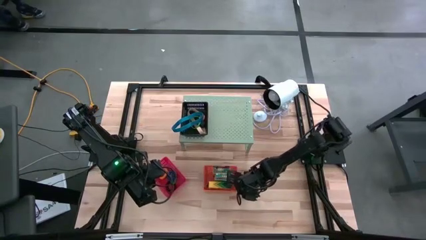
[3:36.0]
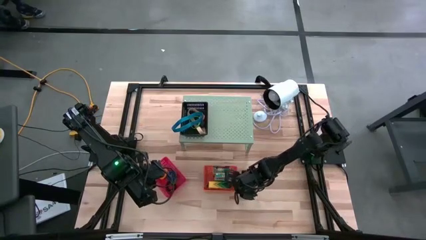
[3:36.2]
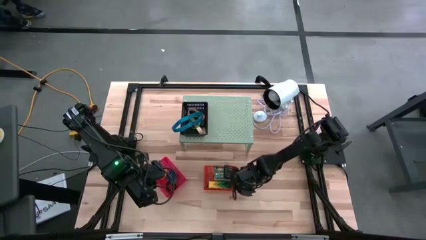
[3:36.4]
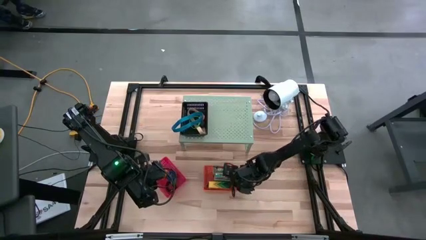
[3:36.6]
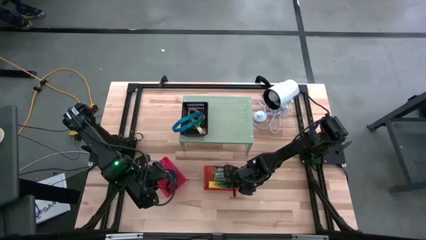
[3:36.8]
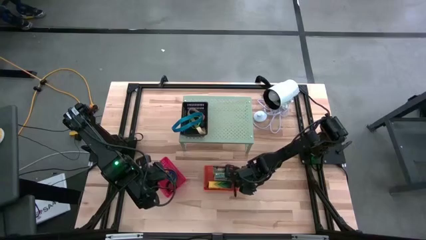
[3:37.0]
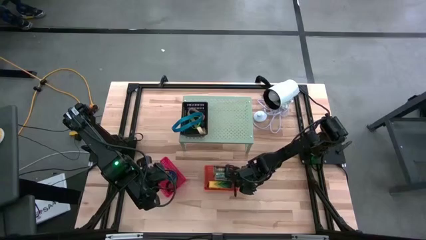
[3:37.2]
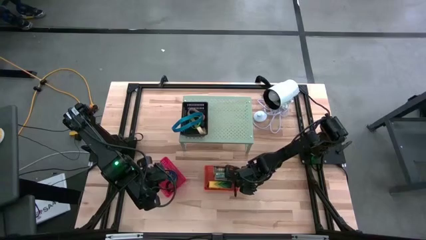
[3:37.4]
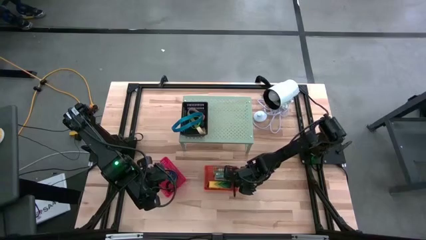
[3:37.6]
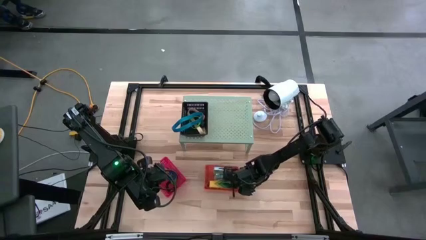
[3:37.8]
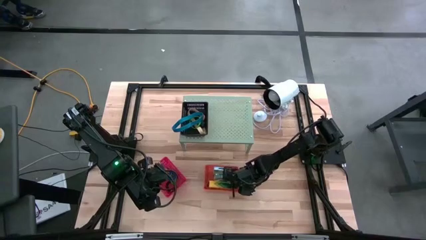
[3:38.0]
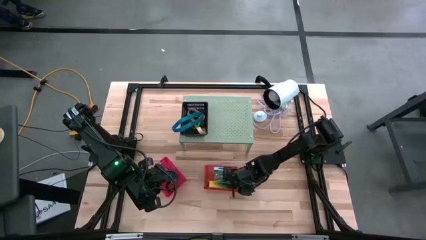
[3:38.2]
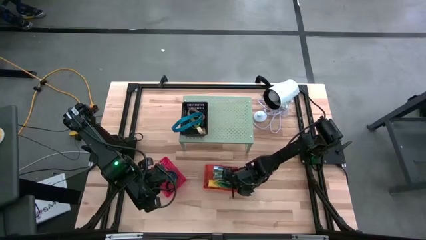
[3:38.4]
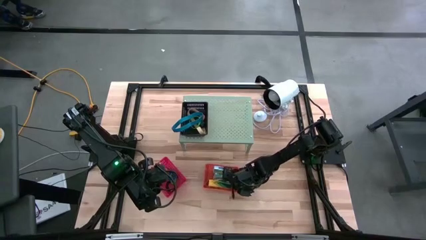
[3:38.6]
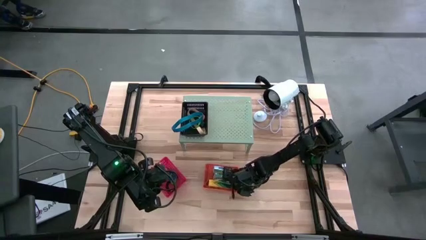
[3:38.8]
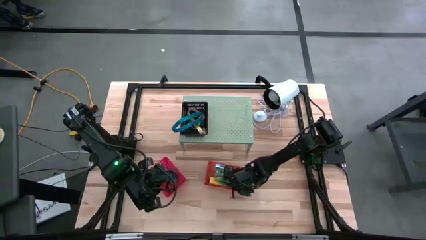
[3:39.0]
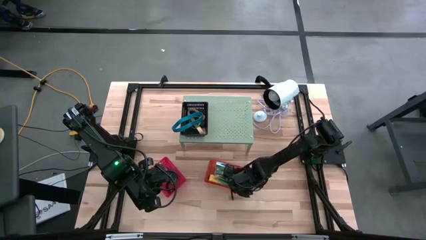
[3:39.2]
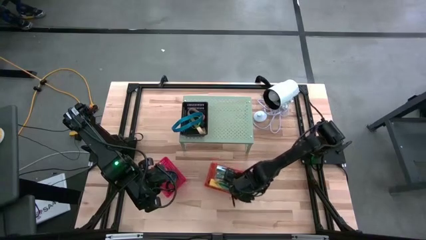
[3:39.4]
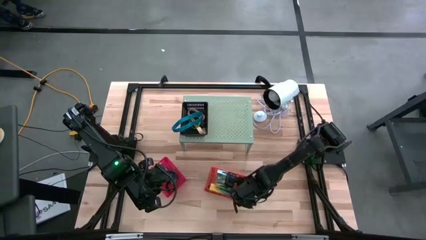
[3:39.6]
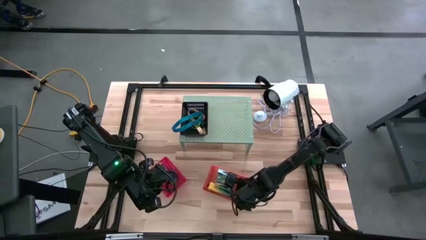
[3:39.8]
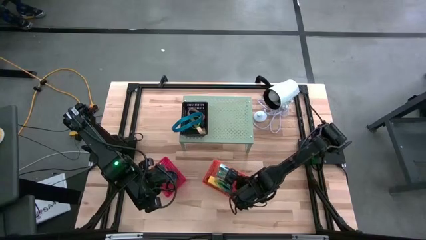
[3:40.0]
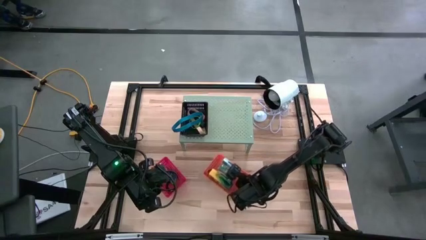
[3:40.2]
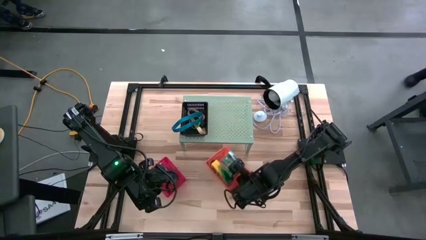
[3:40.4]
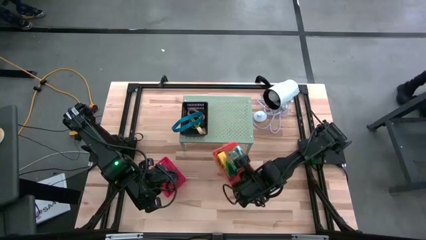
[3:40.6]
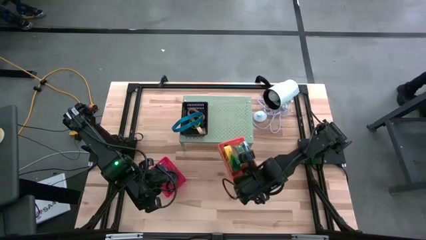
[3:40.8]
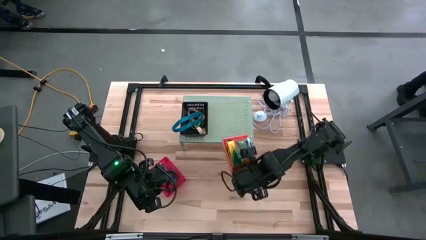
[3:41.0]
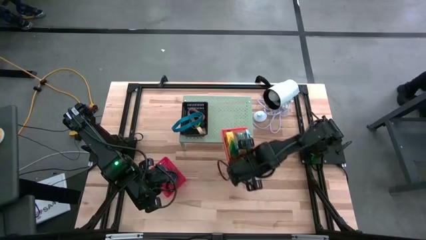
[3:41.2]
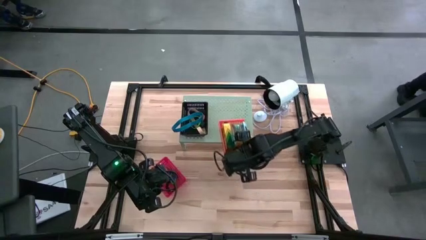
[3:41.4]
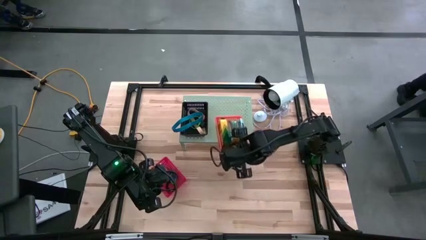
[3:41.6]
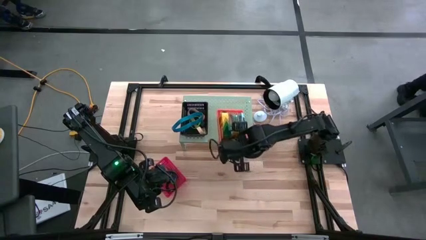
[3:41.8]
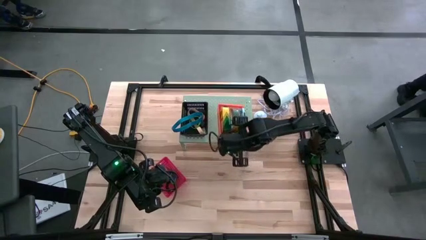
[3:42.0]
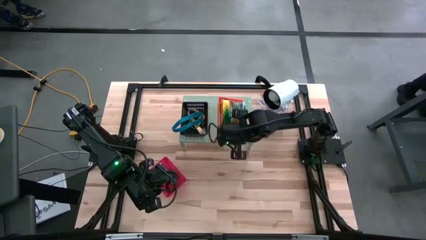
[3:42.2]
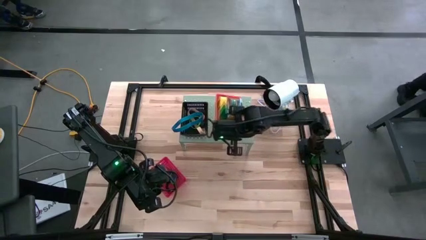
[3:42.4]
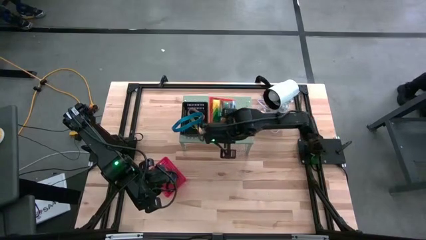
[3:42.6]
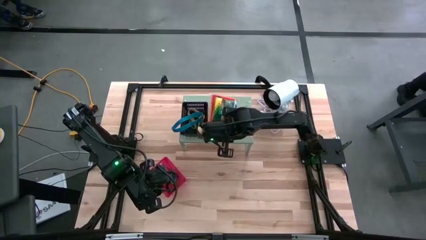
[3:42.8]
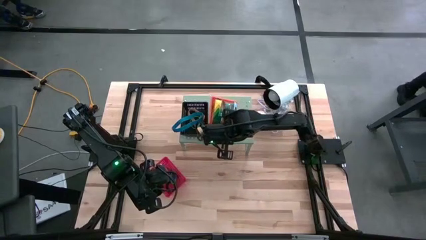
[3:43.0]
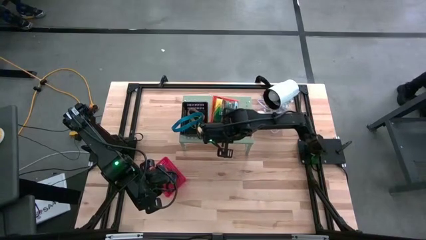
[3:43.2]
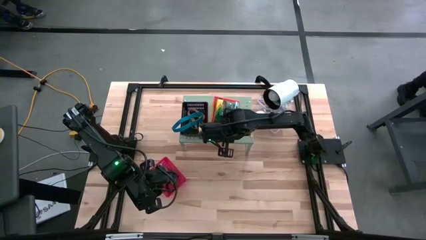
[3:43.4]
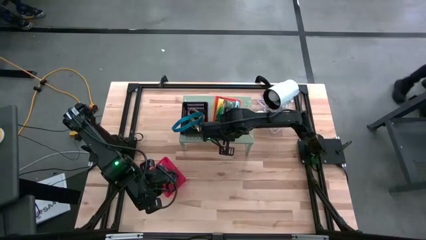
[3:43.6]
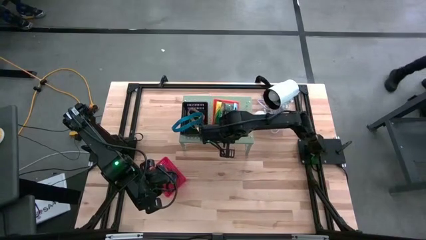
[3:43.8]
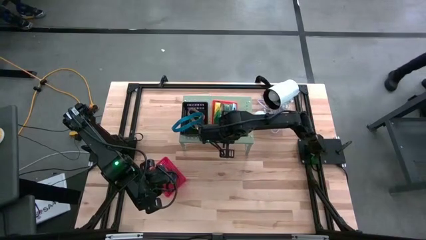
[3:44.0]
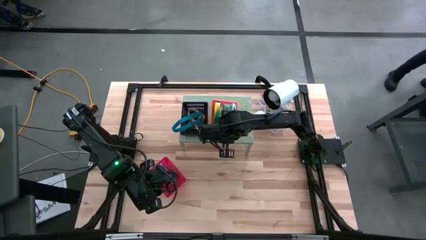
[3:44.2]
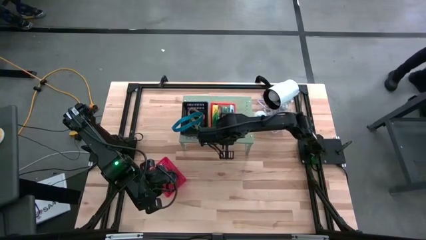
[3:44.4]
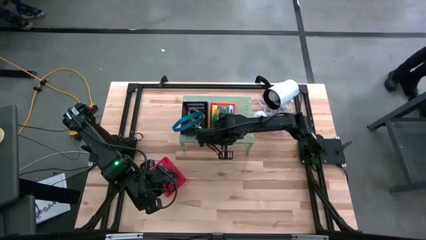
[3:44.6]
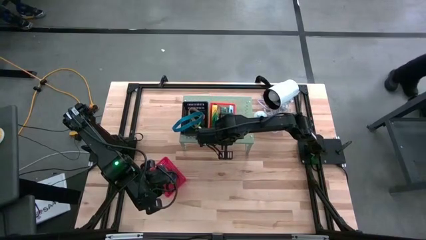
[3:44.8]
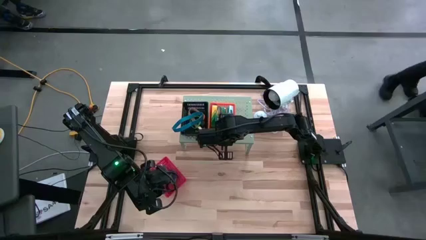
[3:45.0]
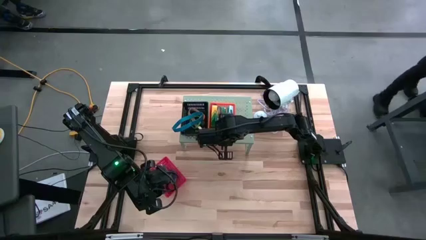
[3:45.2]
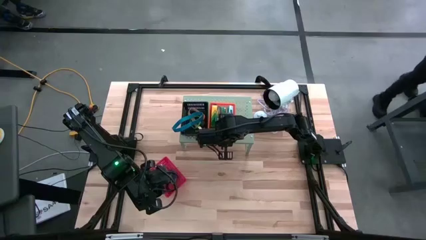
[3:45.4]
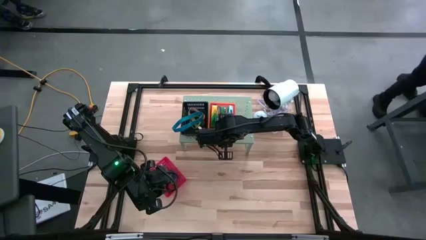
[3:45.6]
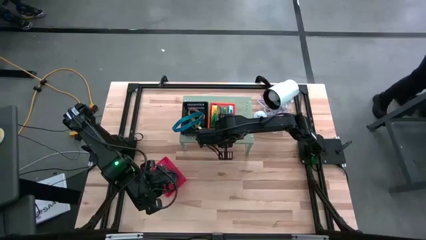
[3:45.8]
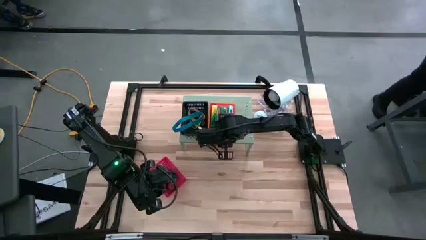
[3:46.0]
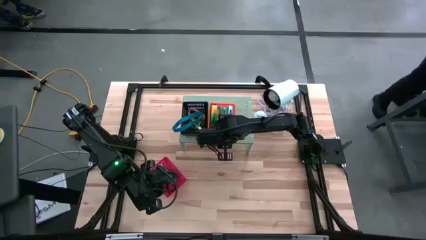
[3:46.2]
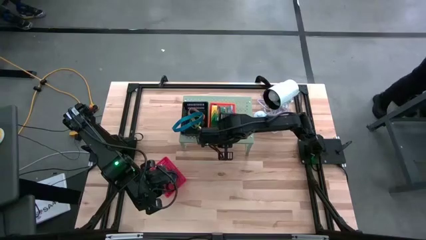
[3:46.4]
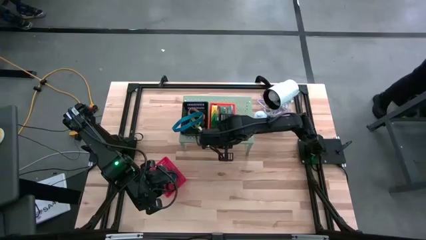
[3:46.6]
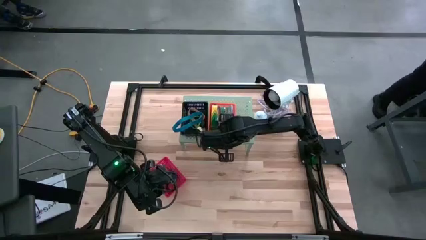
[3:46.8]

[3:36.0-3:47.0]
Task: Pick & Place Office Desk Supplies
Put the orange bin with crayon boxes on the shelf

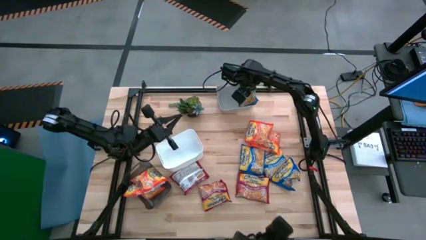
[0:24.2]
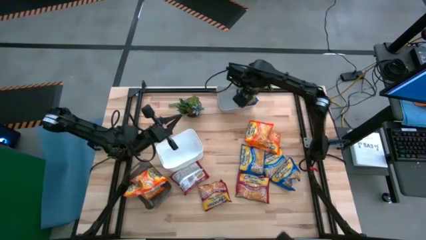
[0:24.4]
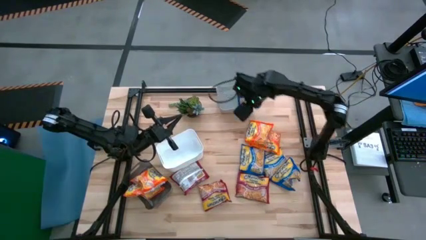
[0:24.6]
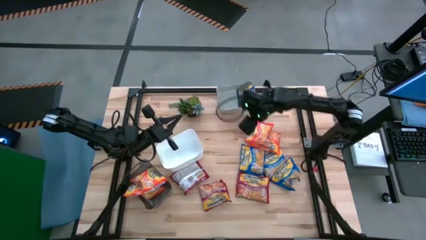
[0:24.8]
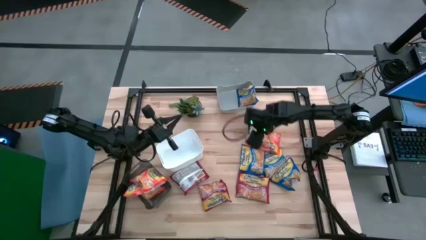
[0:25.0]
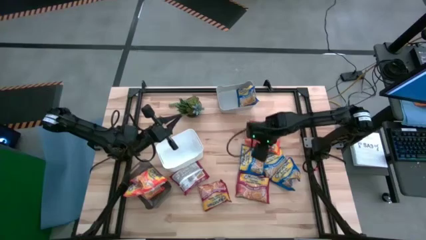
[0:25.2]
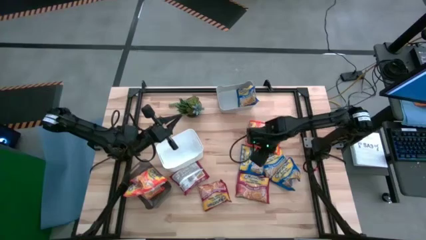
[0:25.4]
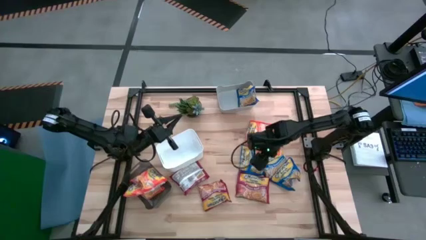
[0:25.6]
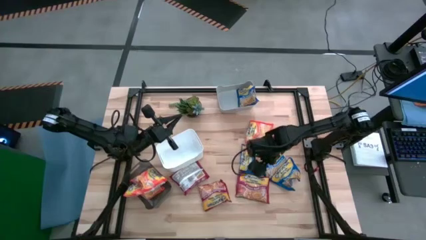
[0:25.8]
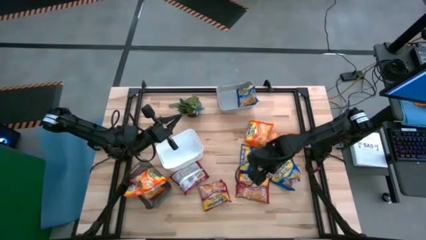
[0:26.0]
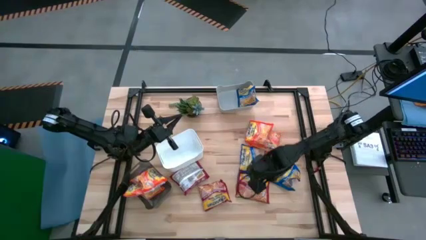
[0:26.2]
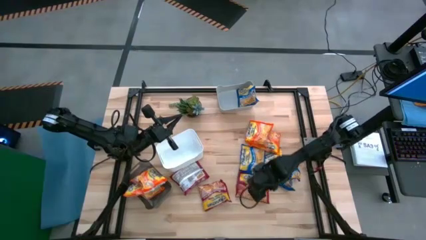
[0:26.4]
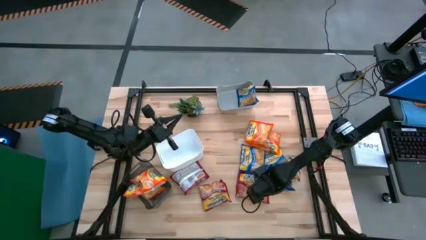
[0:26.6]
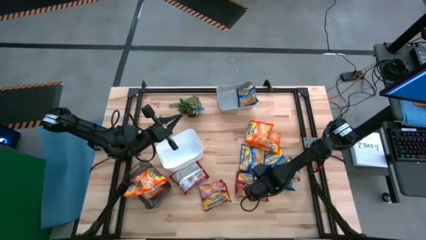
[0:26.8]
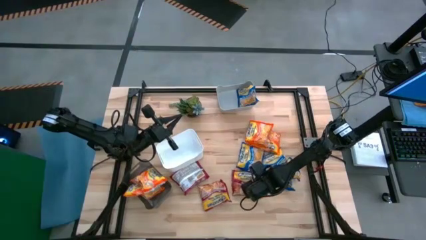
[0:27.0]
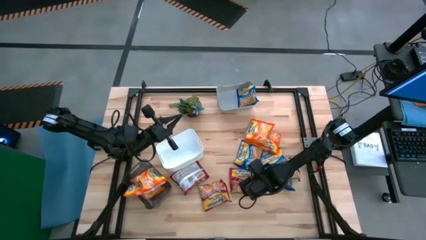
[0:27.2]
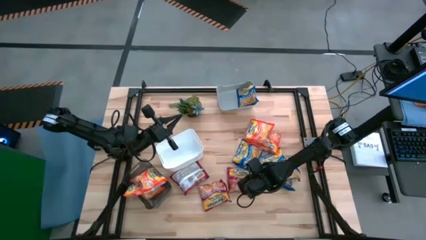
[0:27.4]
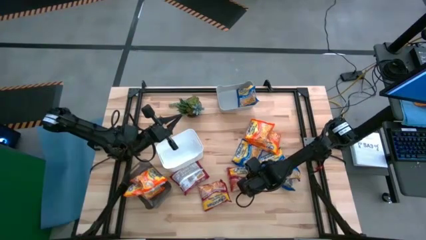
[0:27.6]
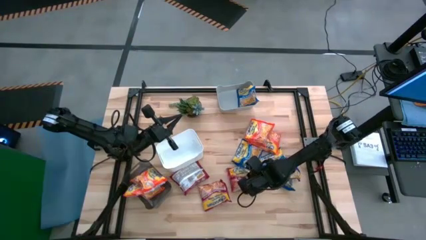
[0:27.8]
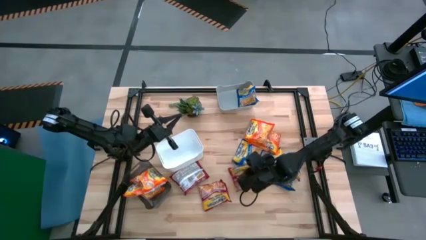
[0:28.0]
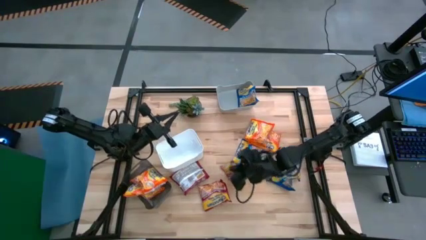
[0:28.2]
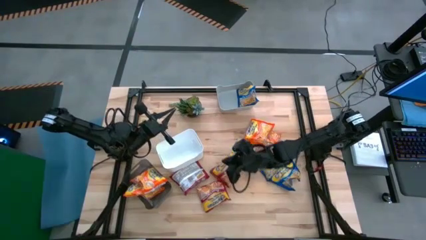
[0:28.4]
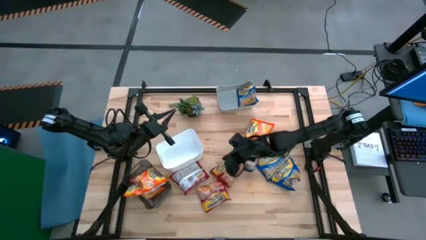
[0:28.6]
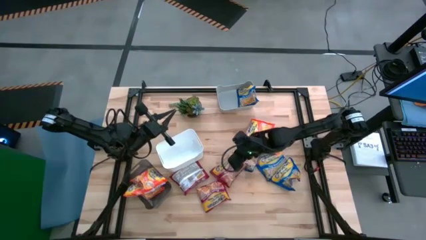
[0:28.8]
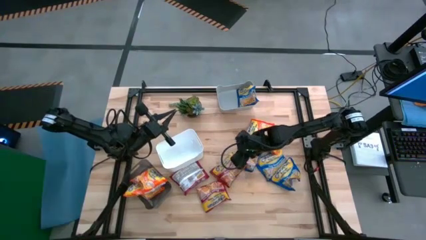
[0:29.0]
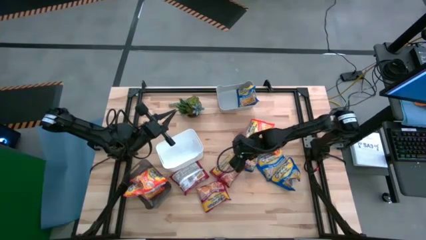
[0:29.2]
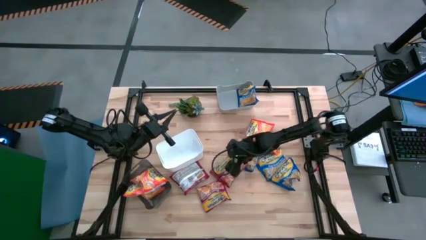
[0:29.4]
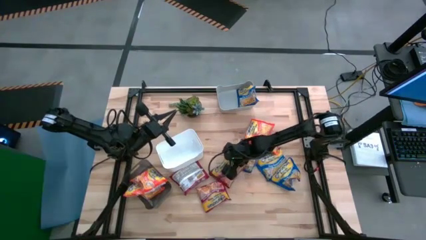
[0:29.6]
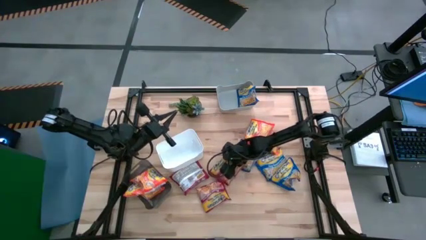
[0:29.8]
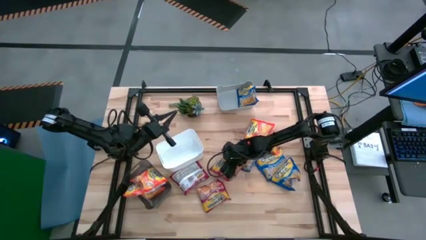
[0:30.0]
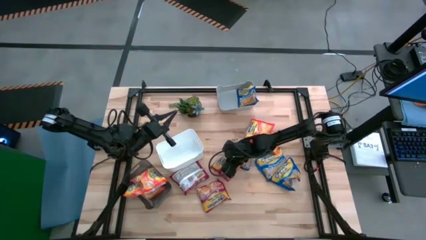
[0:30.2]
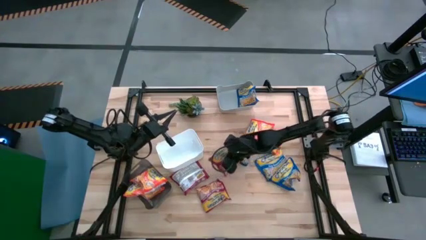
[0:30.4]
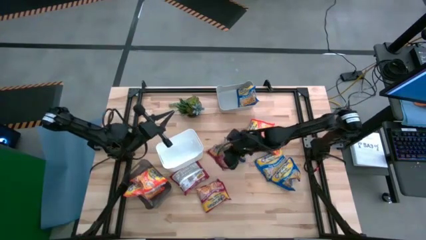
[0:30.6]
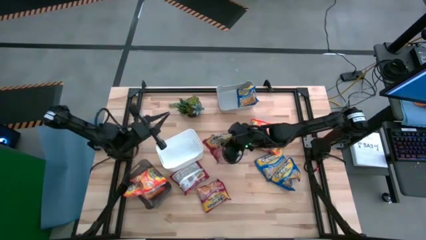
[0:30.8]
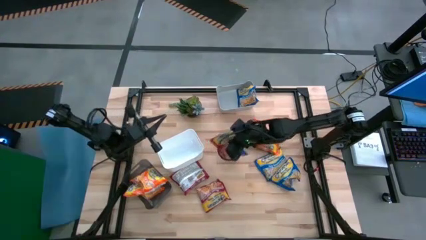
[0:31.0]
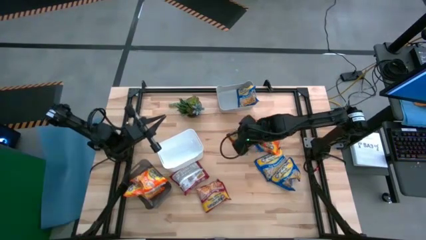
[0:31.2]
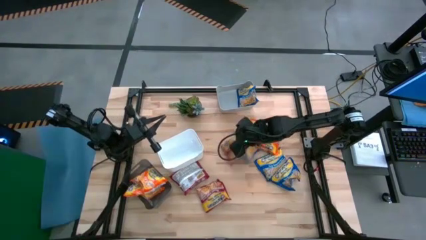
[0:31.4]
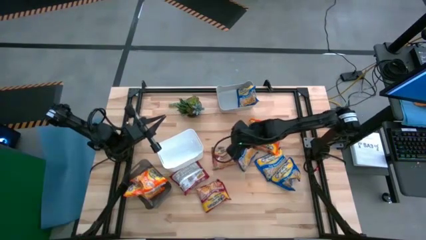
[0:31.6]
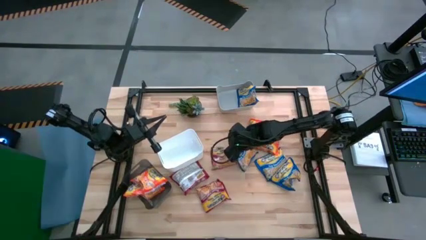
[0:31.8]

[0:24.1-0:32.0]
Task: Sort Maruchan noodles
Put the red noodle pack into the white bin
